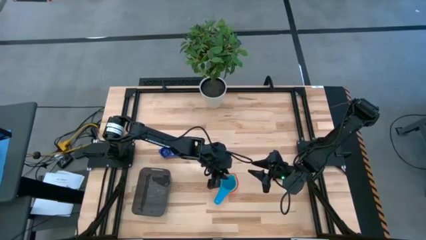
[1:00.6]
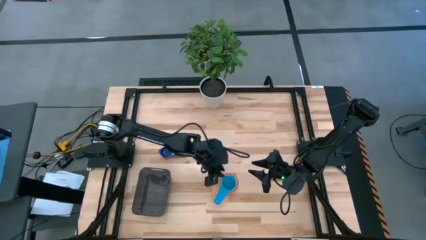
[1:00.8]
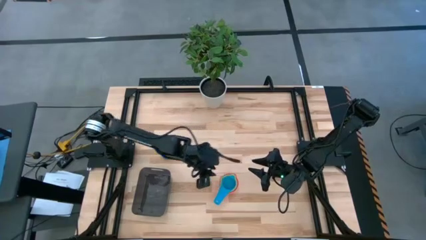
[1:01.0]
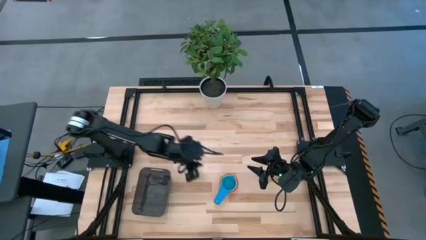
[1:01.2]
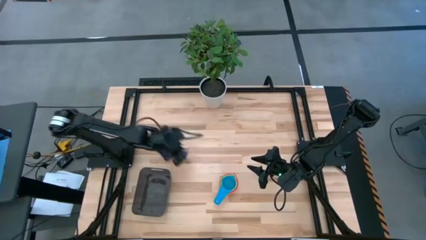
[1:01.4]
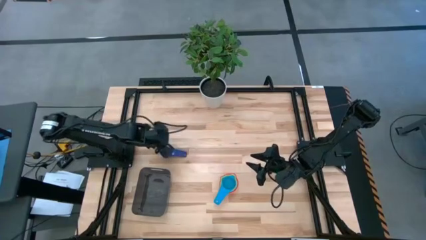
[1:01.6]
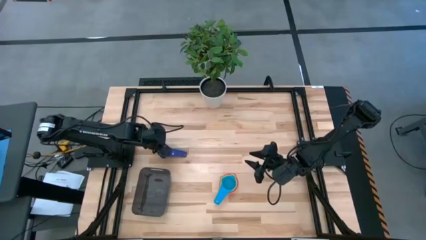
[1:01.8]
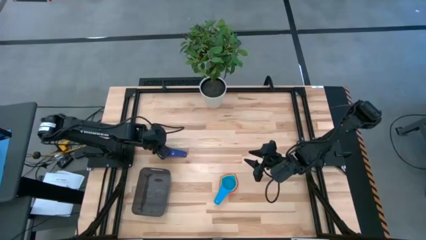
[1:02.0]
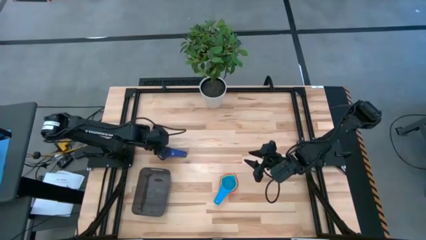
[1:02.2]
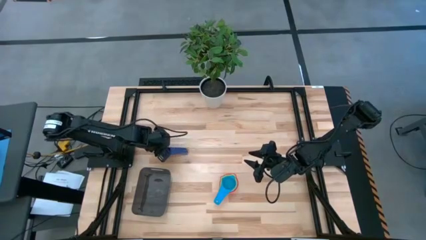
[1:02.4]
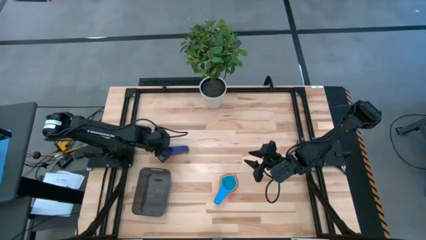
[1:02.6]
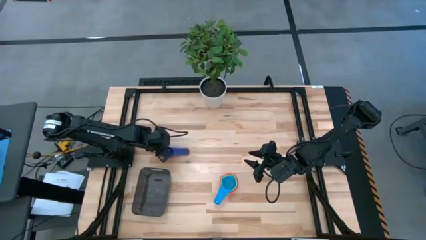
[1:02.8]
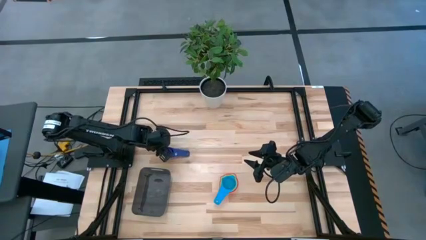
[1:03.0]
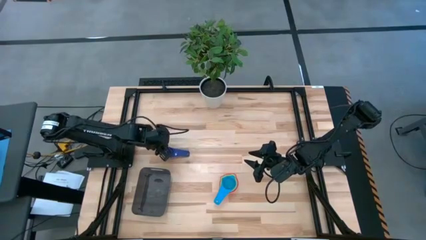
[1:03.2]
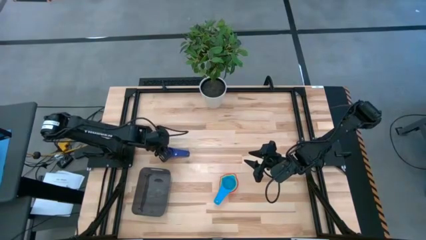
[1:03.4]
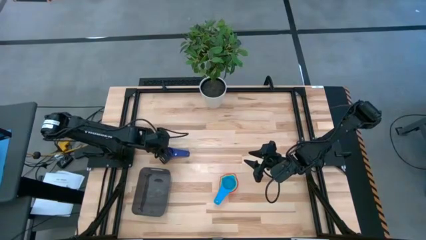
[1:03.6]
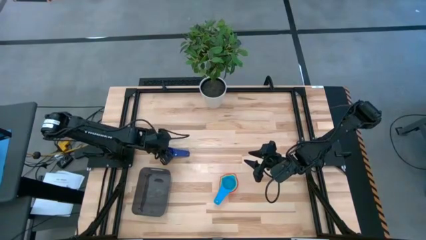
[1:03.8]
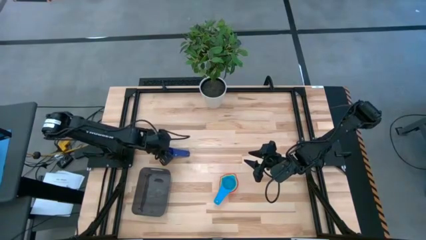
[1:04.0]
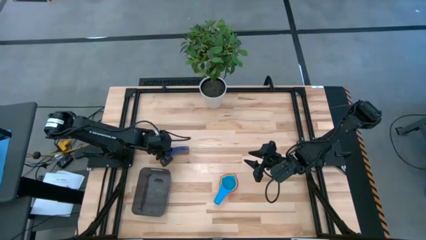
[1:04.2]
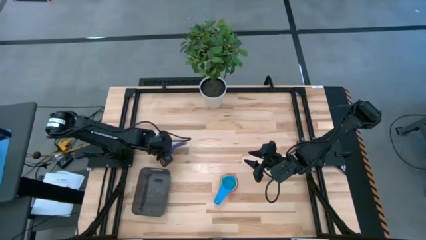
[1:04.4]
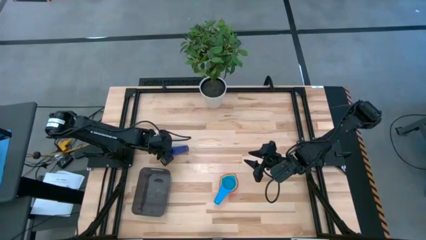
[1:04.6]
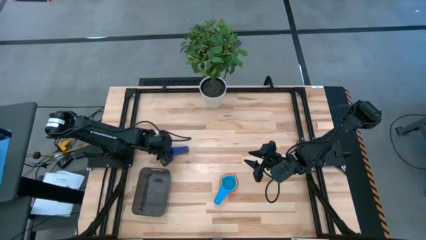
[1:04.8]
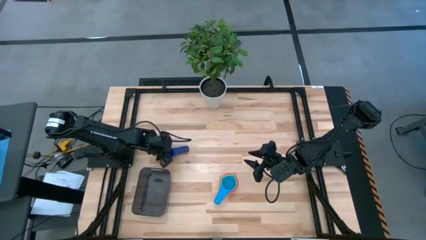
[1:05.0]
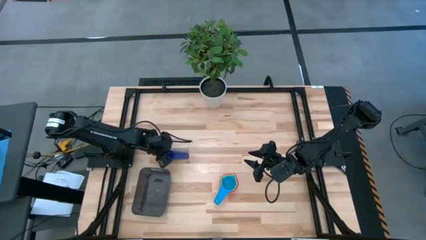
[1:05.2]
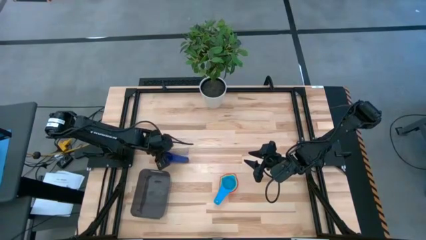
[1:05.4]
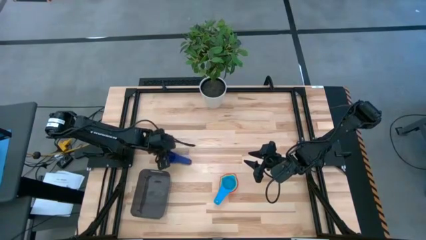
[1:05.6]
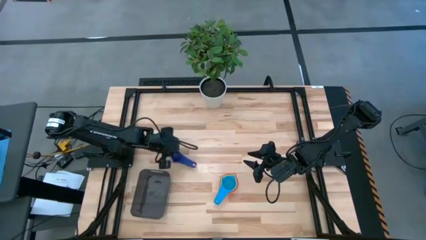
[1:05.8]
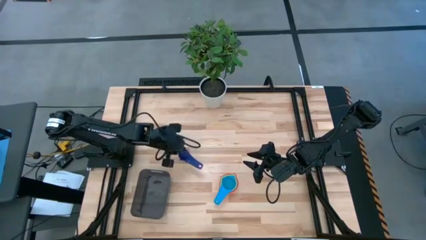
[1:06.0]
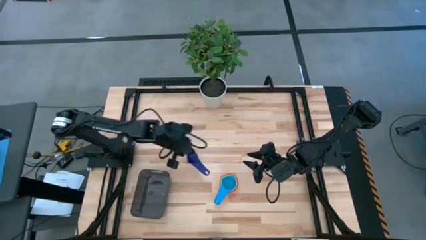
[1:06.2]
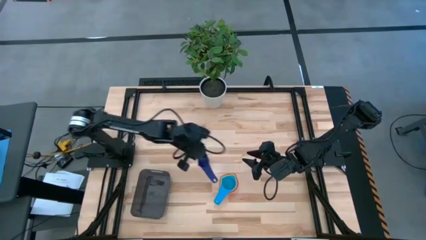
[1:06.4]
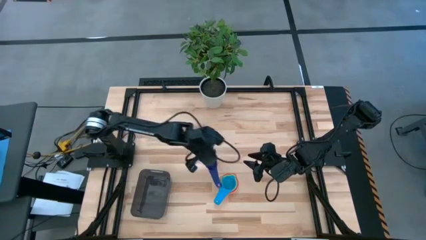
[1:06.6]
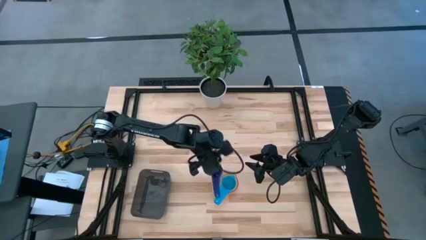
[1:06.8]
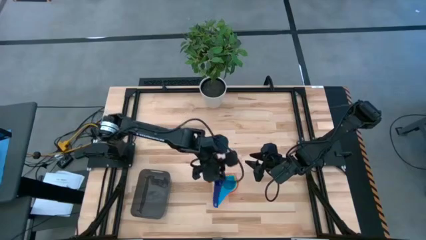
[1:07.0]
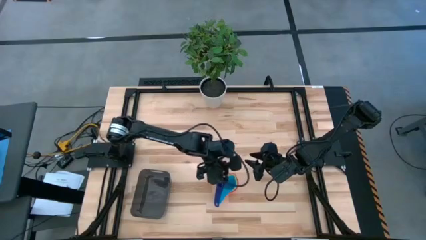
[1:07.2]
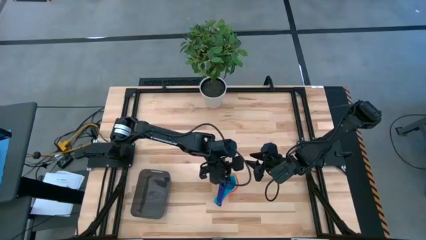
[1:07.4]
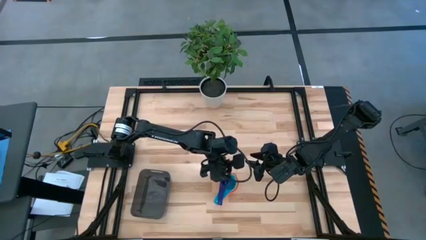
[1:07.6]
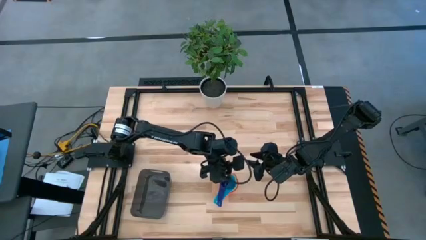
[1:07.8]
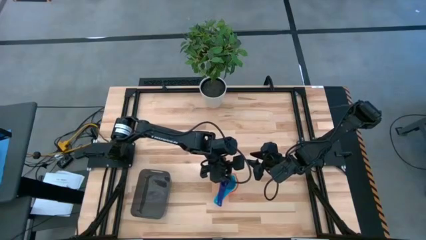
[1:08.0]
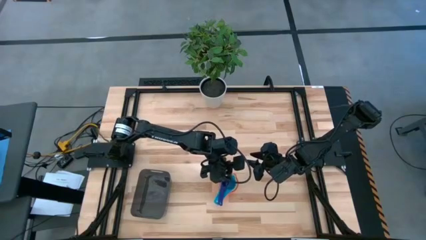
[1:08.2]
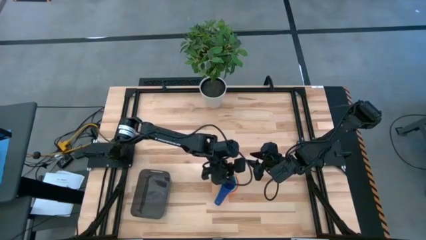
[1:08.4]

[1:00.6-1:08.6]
Task: Nest measuring cups in basket
Stack the dark blue measuring cup on top of the light blue measuring cup

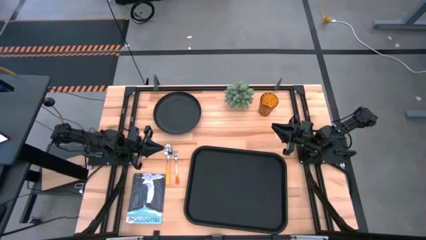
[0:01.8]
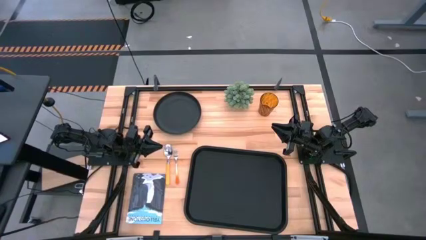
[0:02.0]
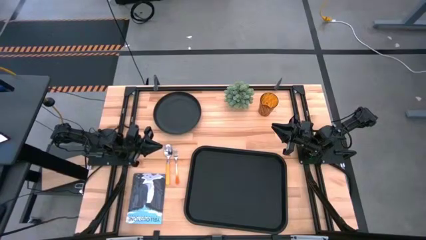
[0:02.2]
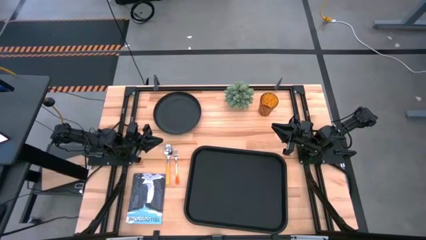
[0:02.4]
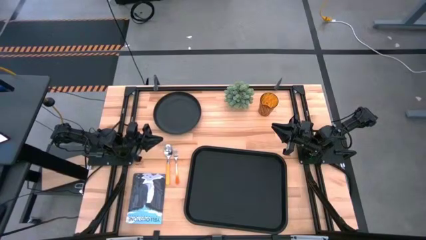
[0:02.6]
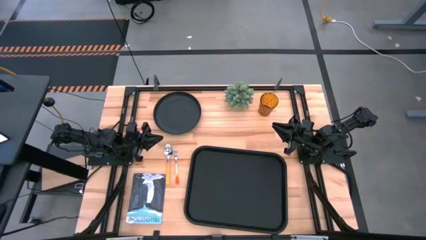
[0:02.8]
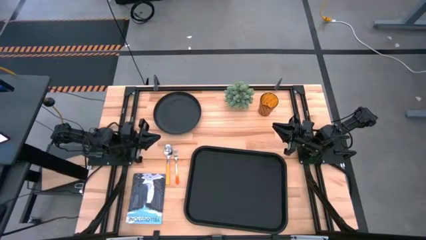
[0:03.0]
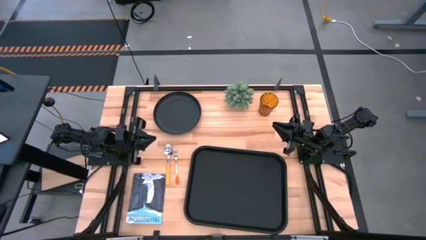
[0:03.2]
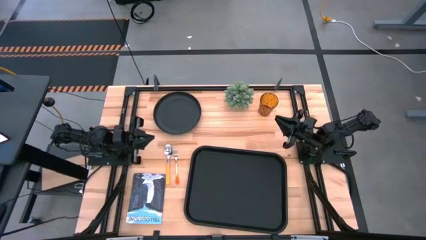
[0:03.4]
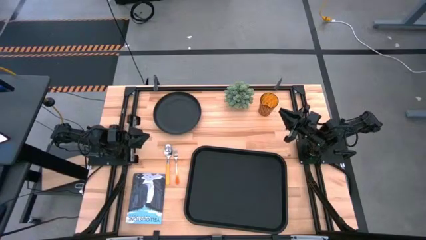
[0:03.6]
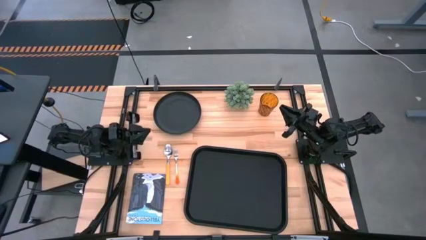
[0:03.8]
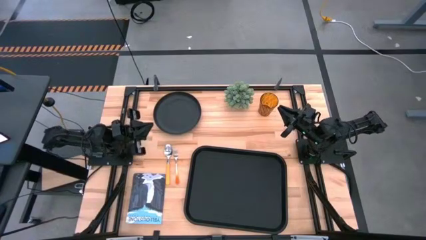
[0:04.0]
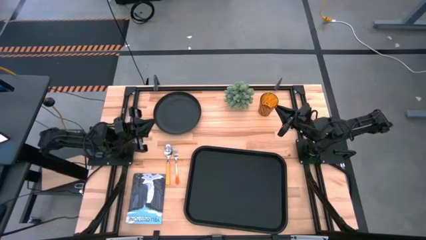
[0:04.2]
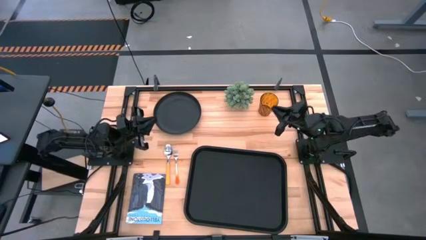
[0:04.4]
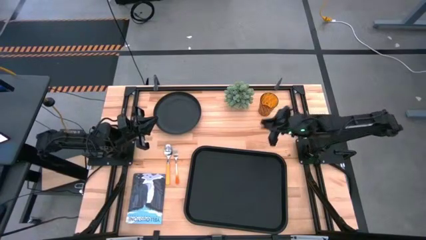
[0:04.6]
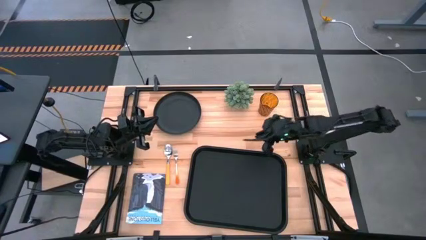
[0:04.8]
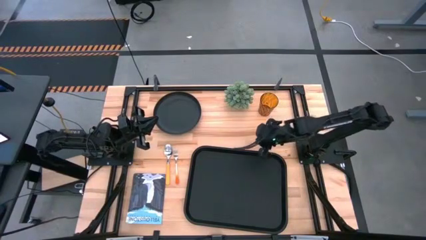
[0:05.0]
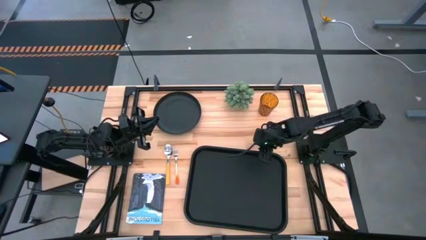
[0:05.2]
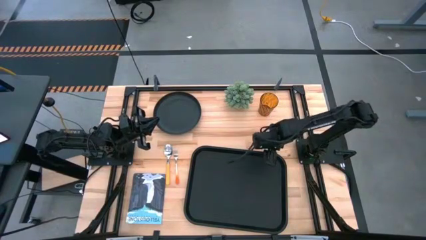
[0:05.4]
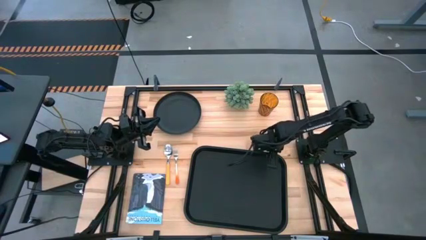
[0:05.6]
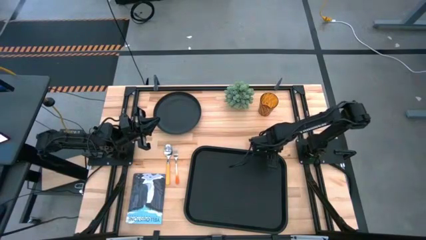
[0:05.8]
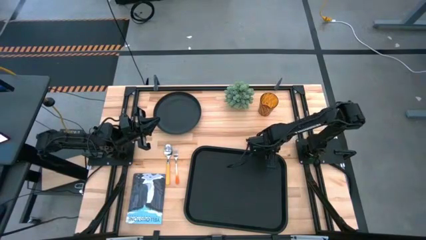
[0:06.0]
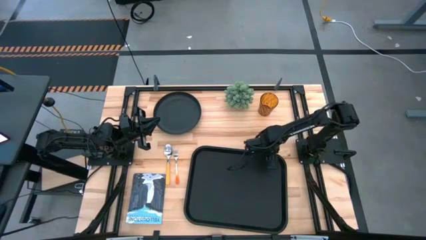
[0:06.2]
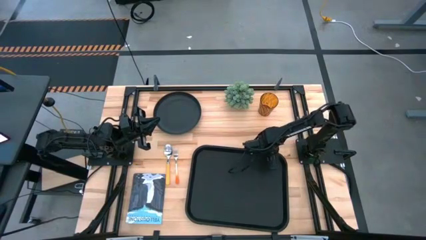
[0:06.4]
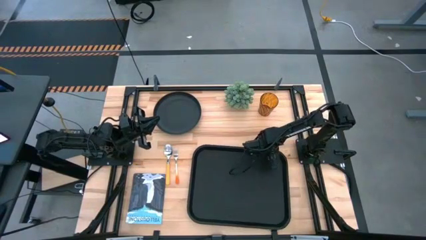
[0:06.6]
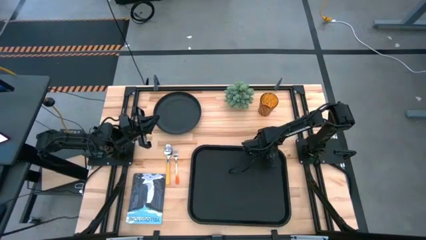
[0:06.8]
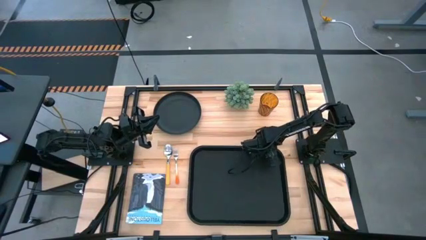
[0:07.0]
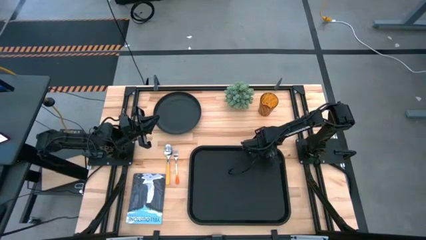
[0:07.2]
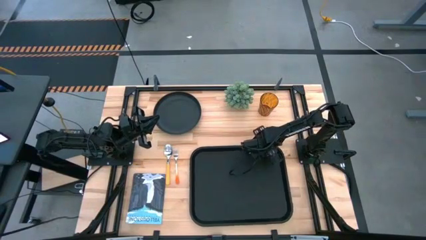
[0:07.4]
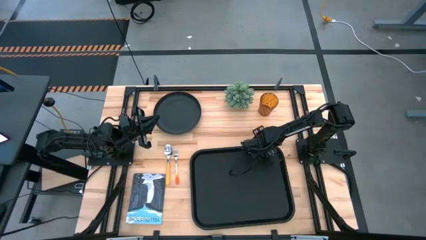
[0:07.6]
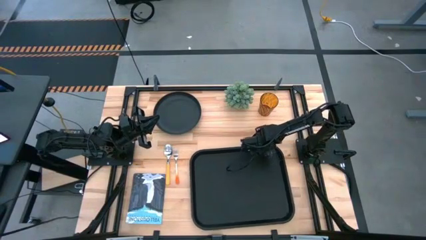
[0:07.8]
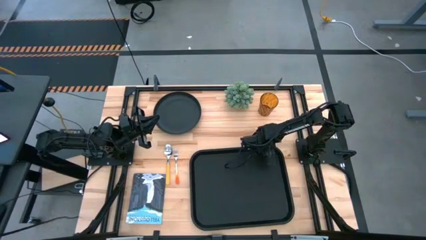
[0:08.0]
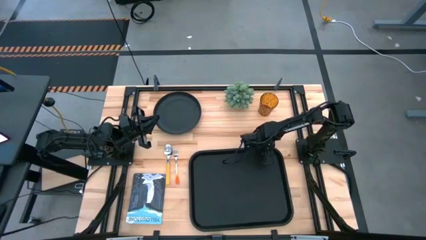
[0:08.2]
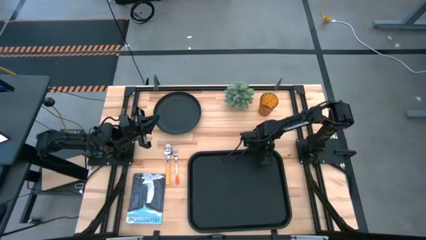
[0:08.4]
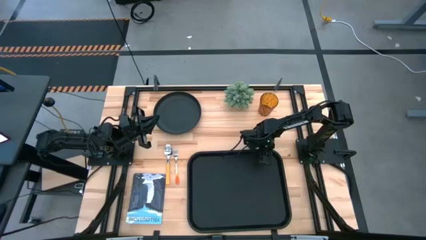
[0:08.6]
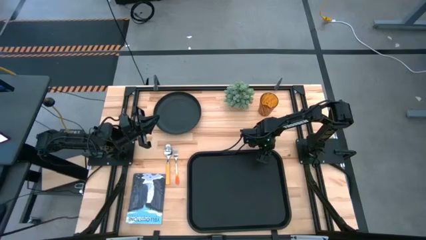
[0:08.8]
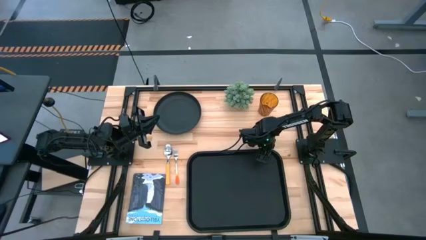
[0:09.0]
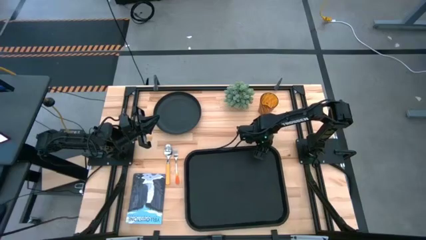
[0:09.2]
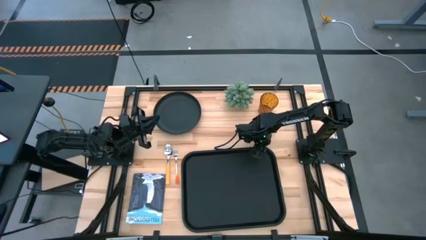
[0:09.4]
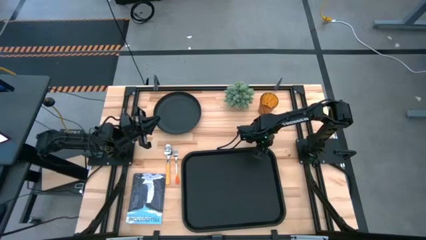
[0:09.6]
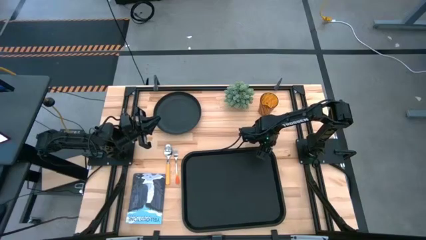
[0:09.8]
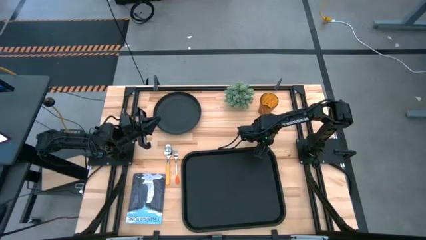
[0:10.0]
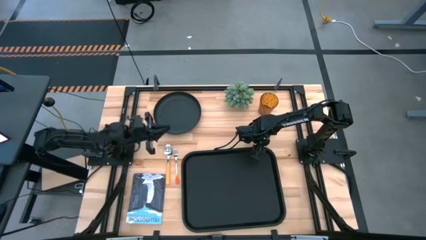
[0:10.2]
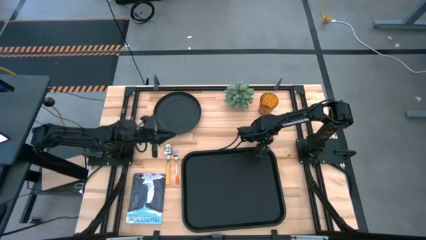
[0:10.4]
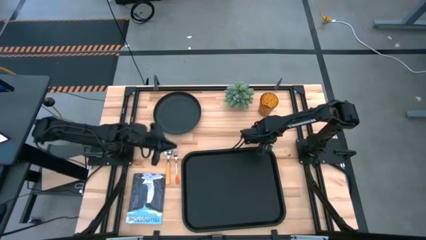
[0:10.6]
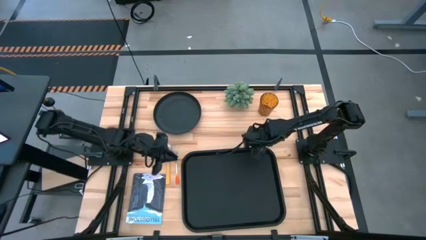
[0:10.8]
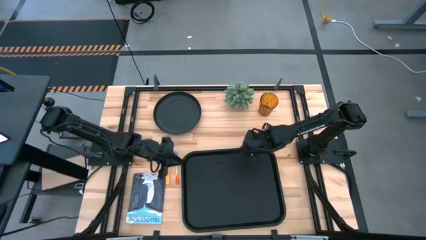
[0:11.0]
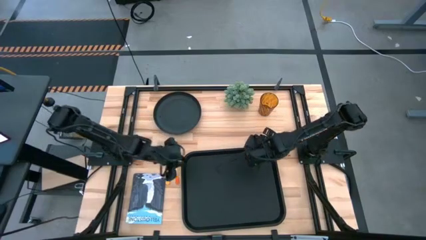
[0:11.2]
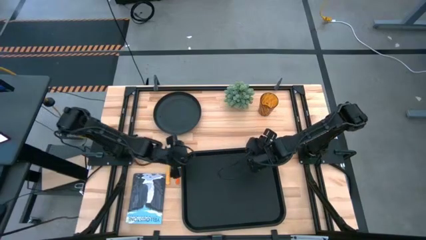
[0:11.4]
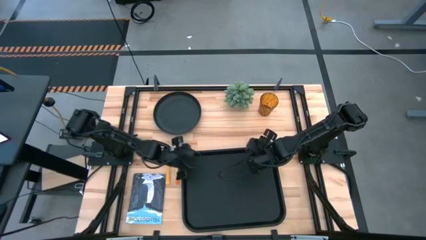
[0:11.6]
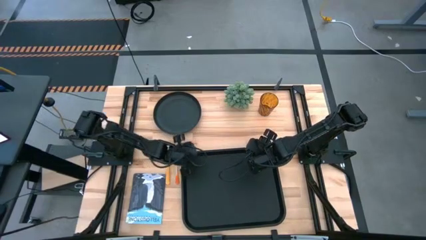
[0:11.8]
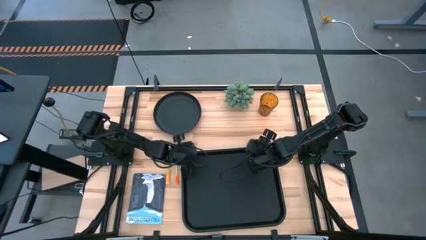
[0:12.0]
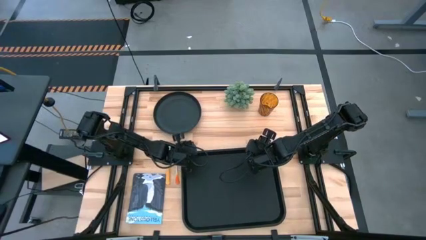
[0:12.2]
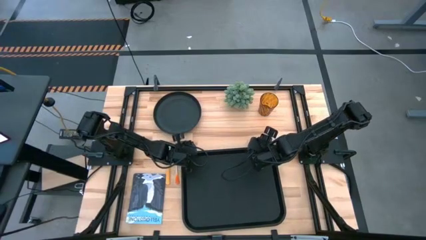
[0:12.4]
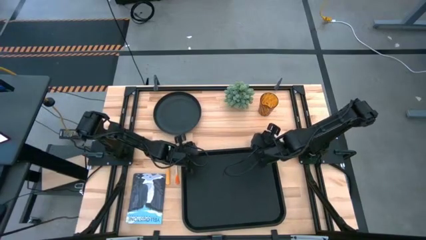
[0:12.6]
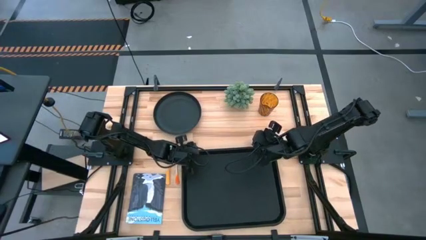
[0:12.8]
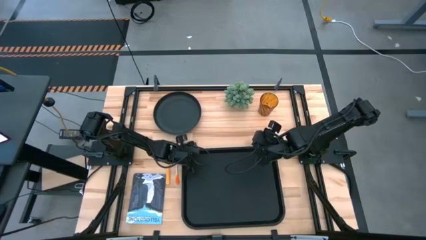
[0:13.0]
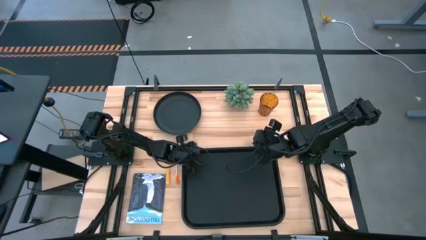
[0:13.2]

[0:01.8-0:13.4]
Task: Pick and place plate/cup/fork/spoon on tray
Adjust the black serving tray
